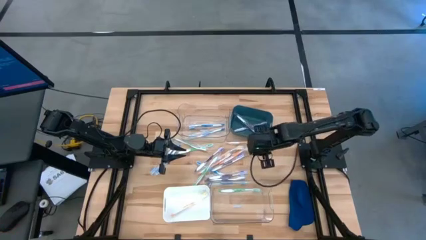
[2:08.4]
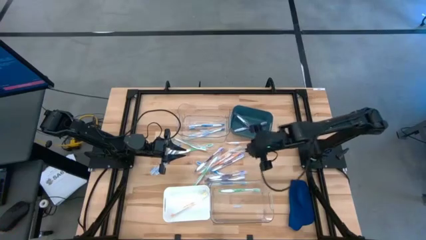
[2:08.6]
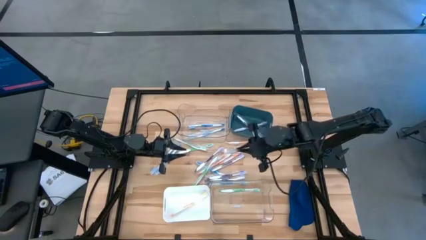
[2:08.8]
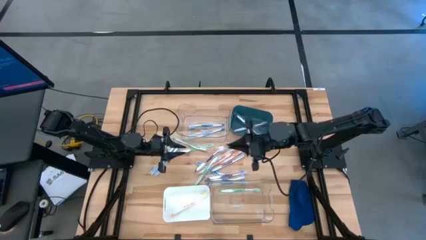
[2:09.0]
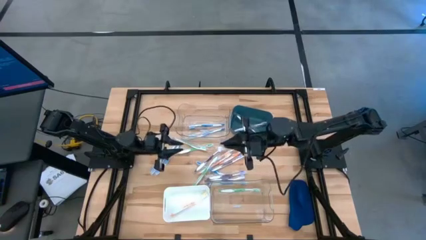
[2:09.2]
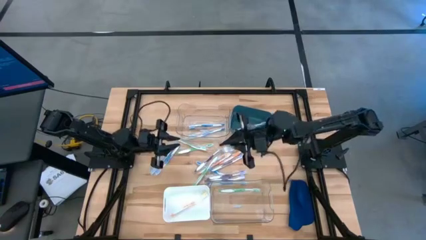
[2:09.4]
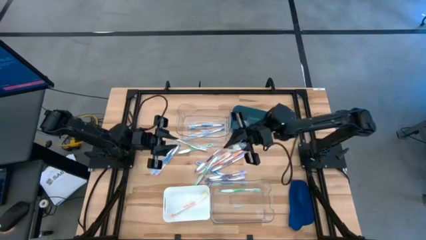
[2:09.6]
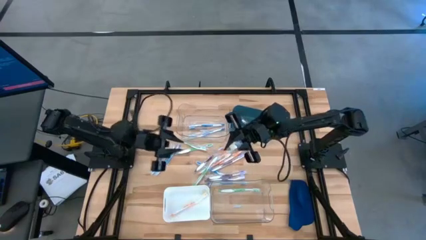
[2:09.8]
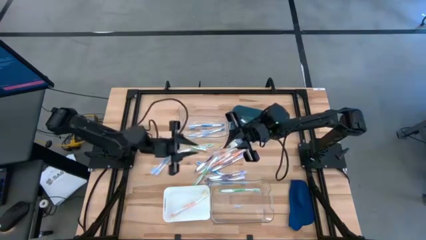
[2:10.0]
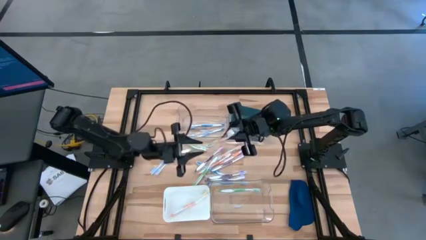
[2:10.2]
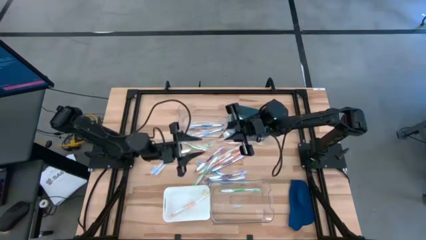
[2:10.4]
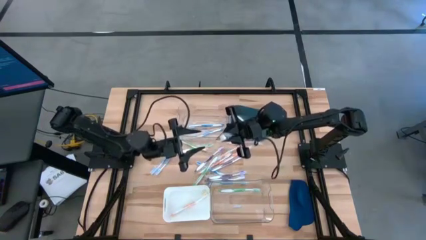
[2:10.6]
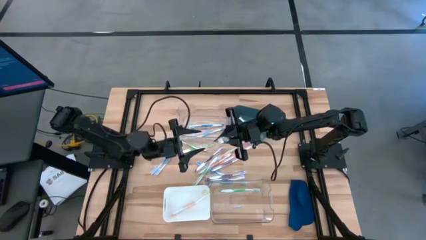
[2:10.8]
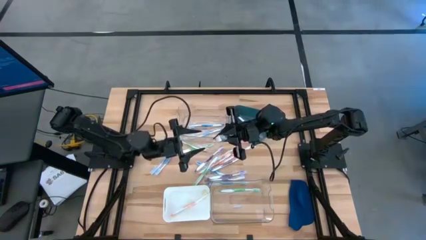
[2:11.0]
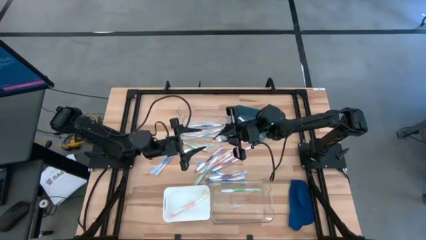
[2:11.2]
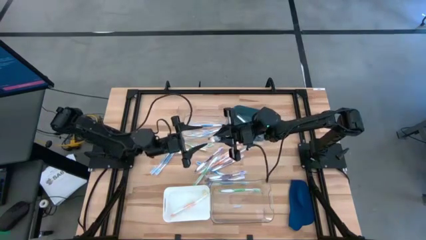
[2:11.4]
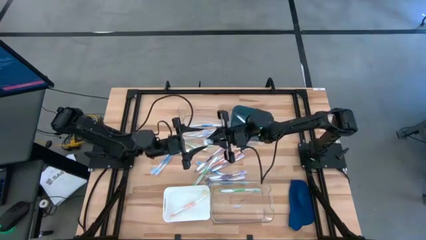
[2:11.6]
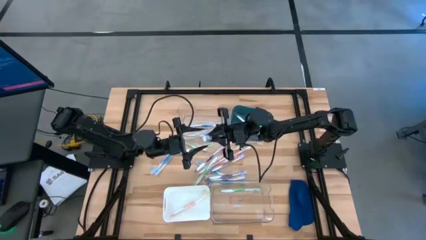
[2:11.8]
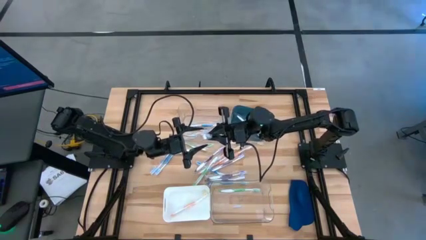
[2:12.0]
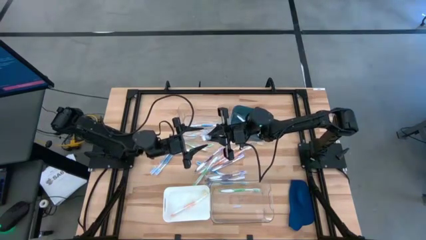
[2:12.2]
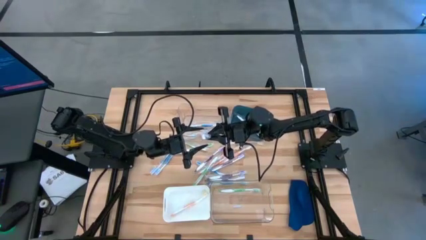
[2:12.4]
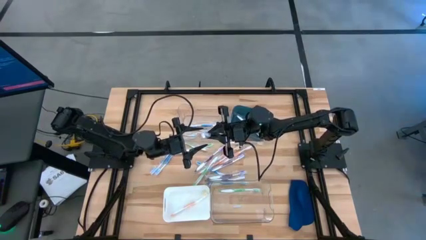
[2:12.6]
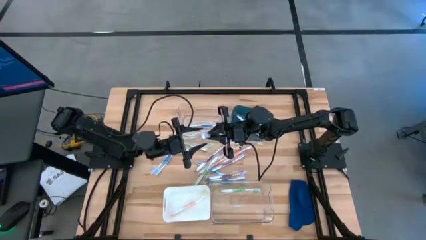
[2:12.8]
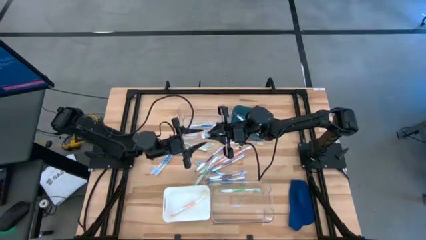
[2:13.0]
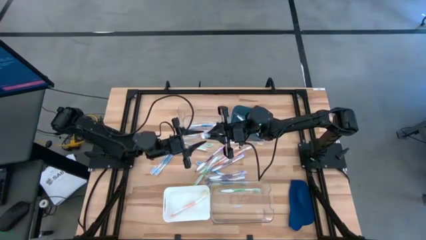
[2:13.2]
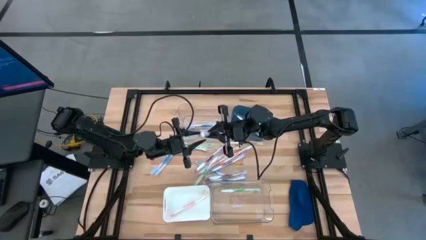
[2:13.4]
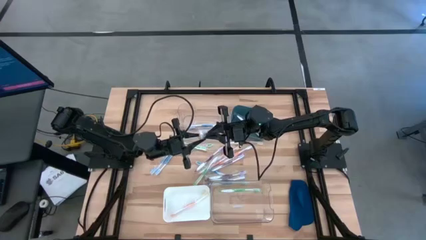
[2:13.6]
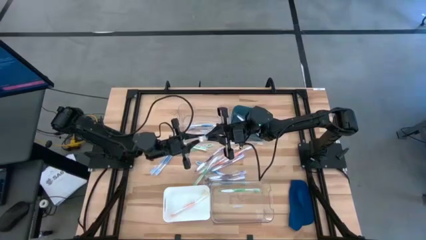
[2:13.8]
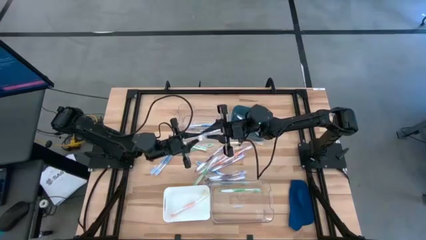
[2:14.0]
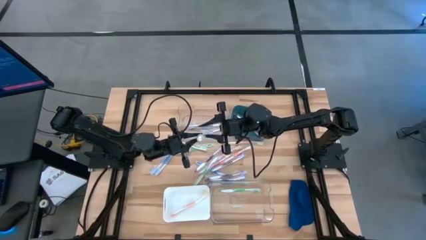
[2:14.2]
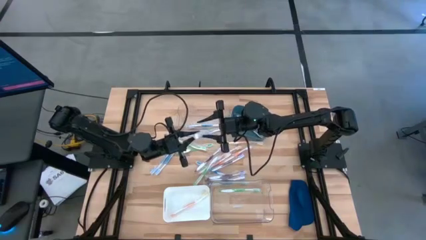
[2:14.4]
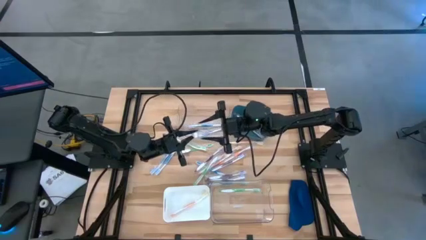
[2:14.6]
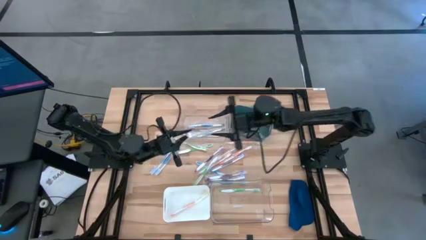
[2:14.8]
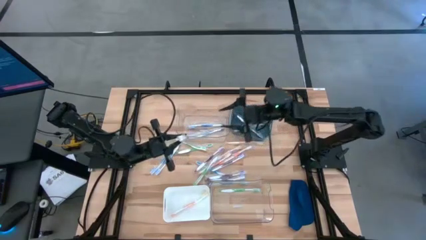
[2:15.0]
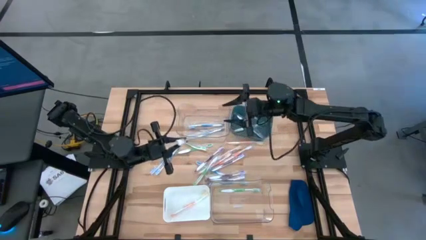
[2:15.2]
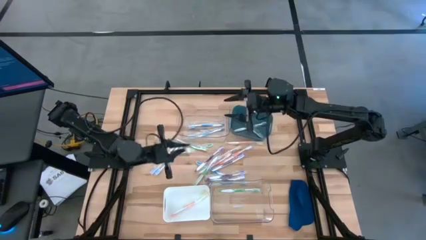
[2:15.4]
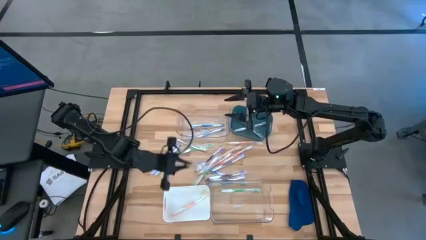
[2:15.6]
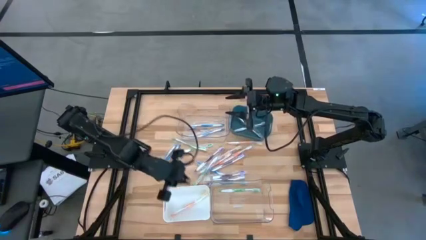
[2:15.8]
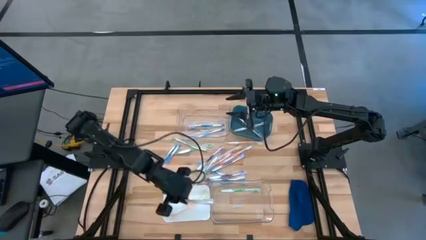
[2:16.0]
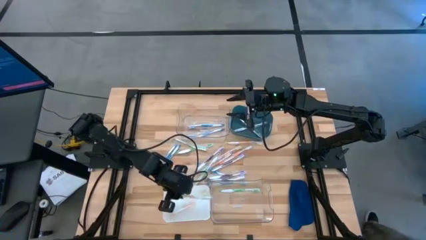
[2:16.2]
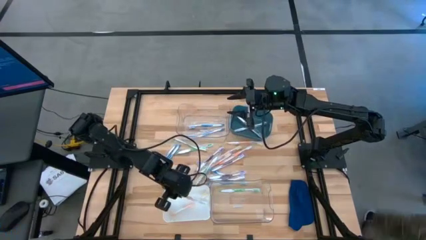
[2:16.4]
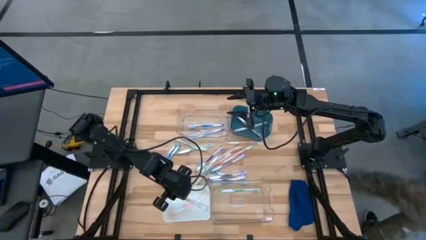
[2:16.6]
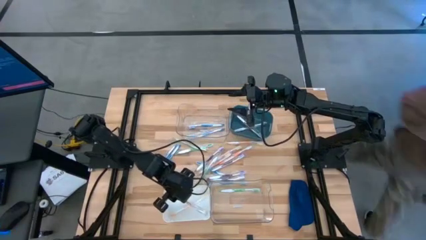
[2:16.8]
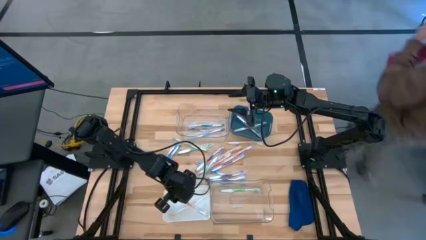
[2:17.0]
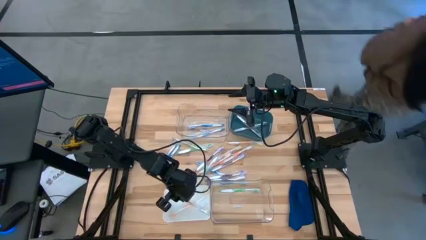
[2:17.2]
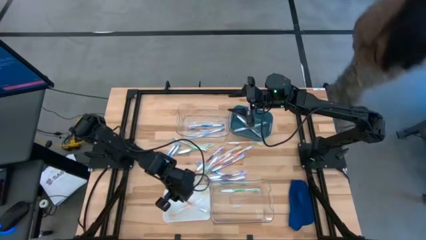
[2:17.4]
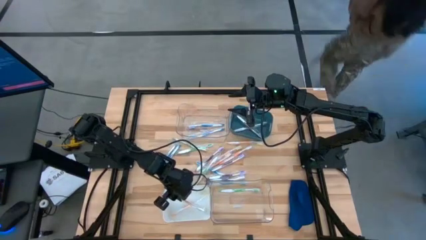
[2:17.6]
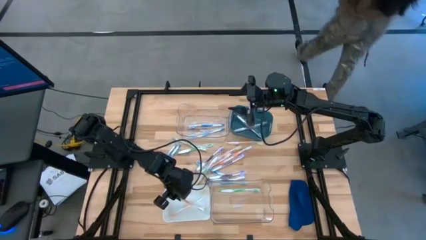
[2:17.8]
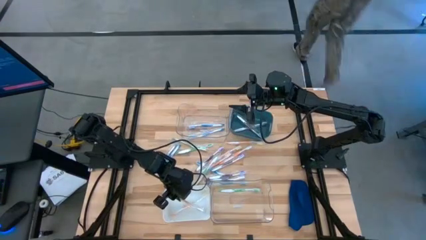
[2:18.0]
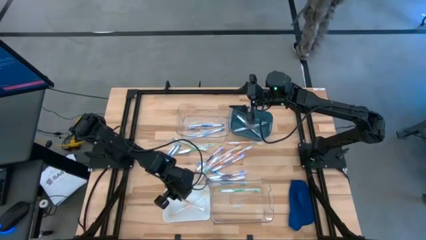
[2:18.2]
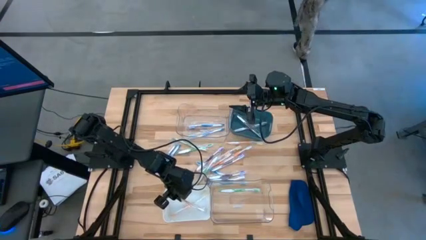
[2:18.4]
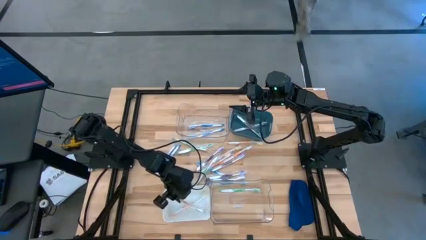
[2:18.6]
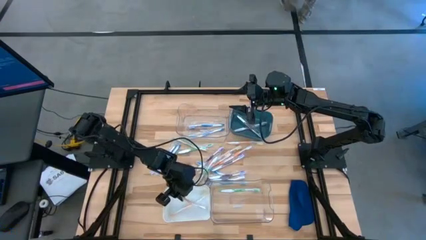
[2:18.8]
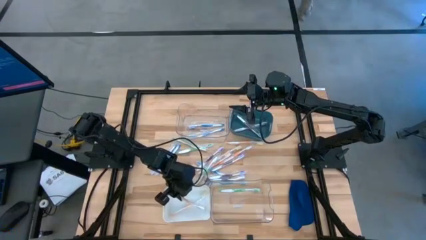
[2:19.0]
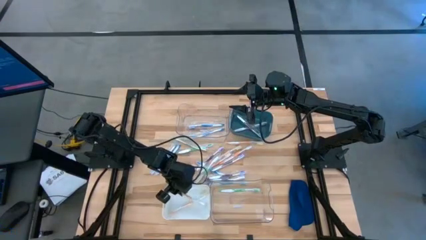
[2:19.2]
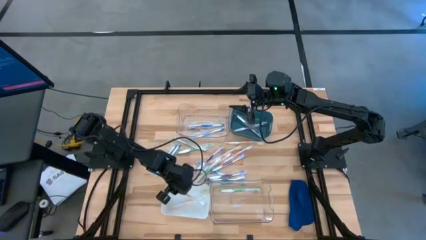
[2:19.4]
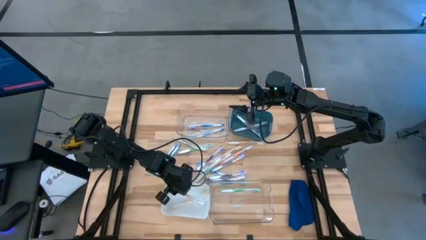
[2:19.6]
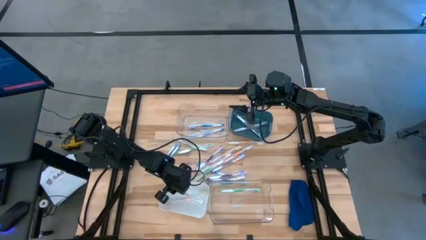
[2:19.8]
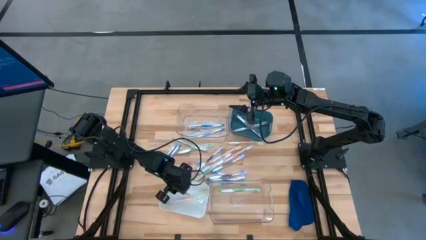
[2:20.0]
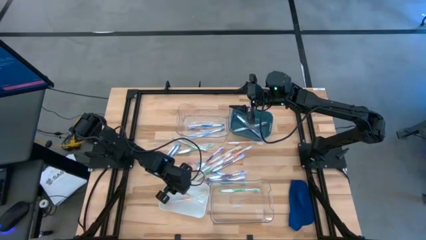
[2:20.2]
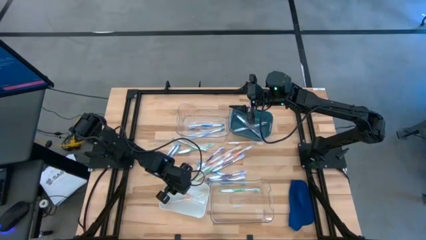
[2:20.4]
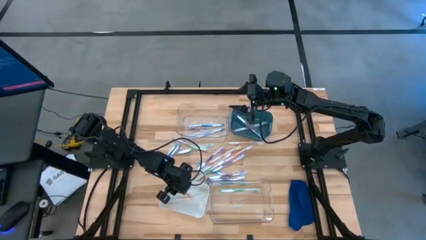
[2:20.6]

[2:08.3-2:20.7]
Task: Pick & Place Toothbrushes
Put the orange toothbrush into the white bin

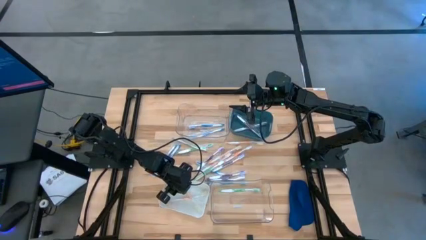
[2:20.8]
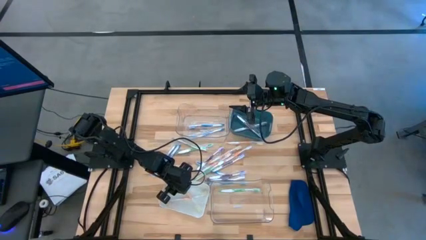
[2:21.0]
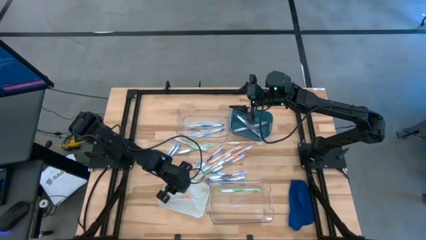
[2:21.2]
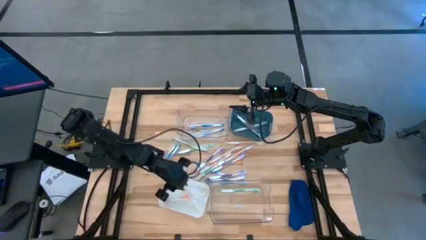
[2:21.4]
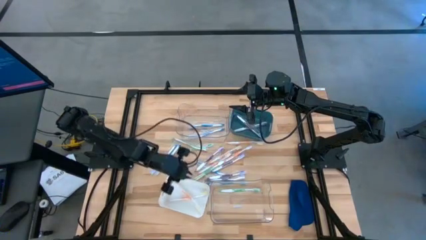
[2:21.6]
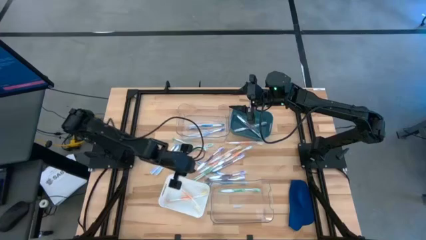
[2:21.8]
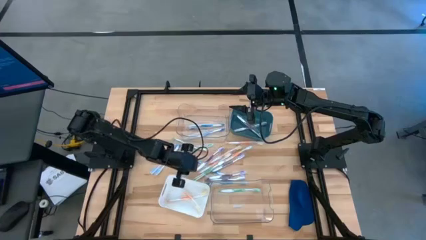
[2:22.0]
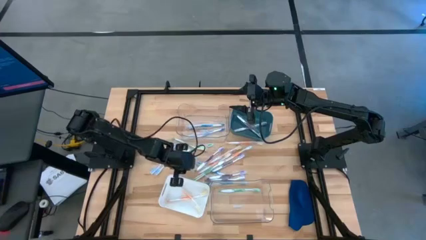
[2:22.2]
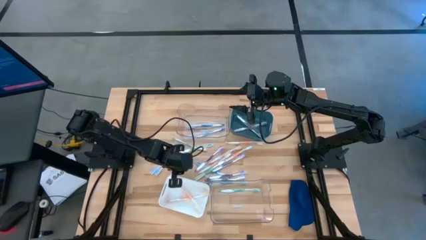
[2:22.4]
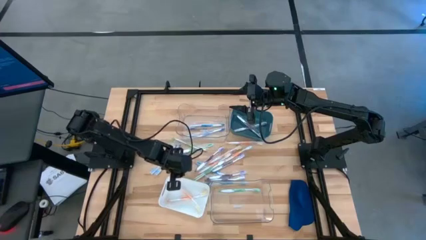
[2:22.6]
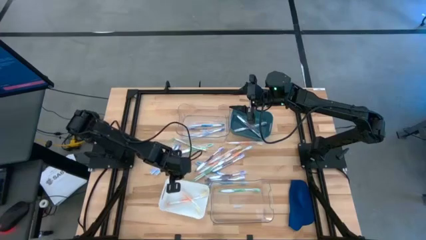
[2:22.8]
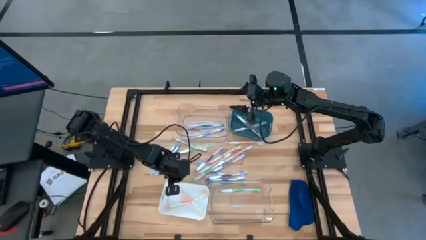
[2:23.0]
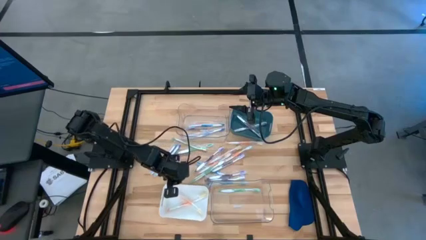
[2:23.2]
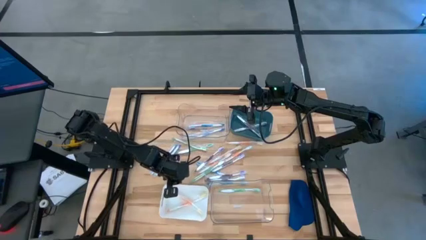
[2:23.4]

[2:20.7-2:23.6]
Adjust the white bin
